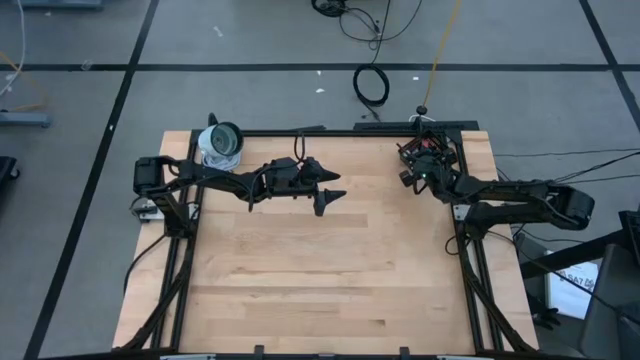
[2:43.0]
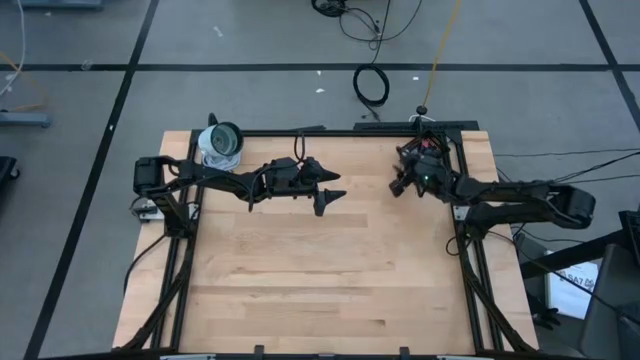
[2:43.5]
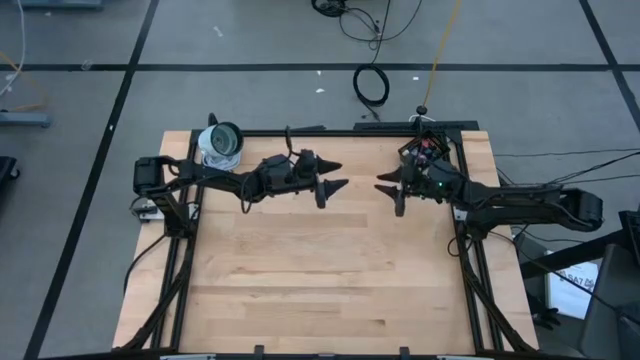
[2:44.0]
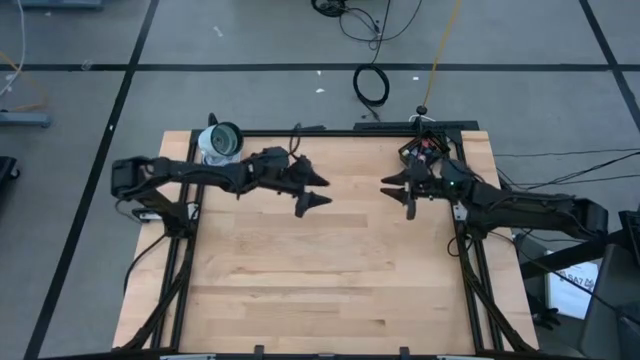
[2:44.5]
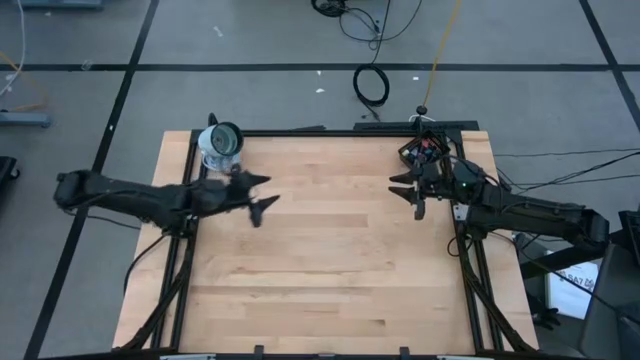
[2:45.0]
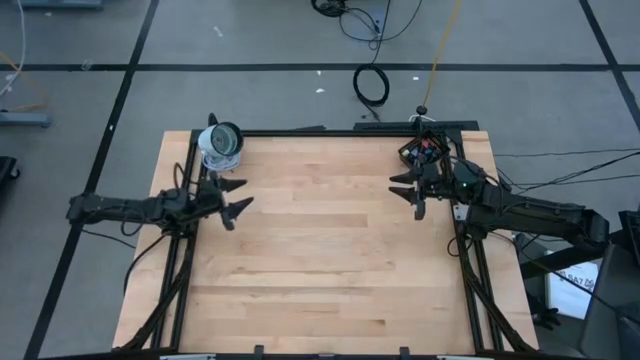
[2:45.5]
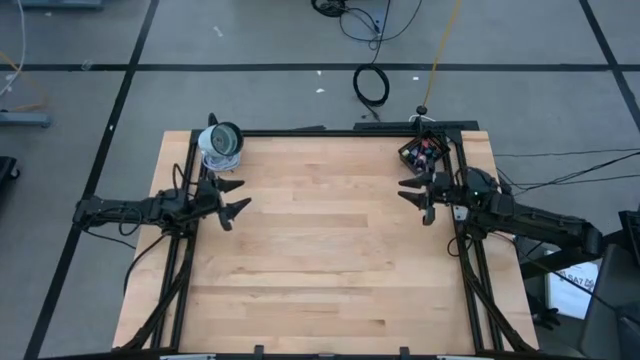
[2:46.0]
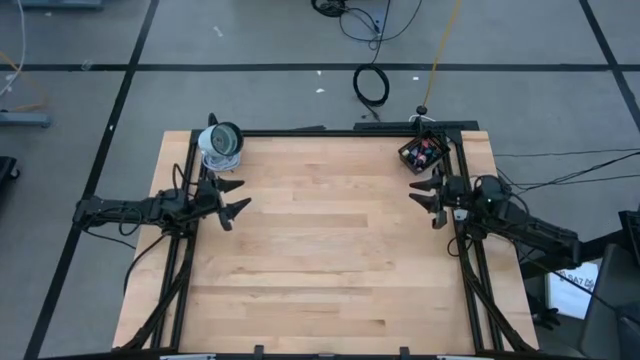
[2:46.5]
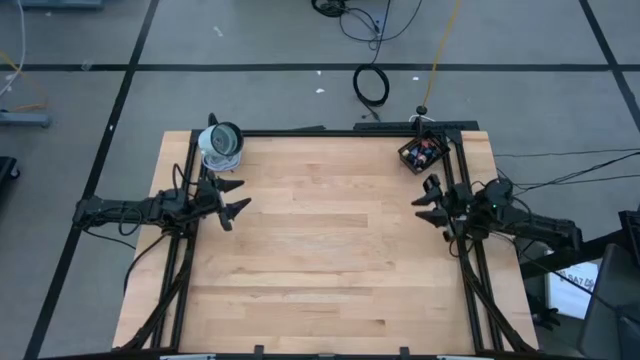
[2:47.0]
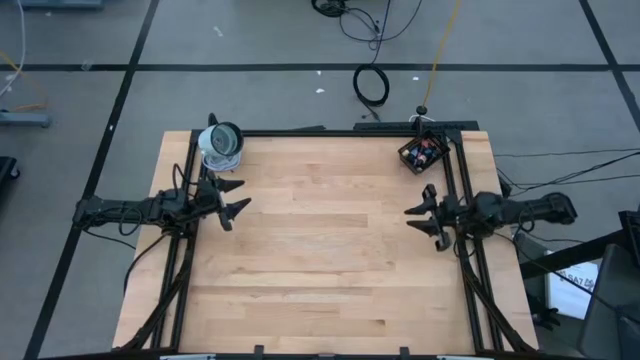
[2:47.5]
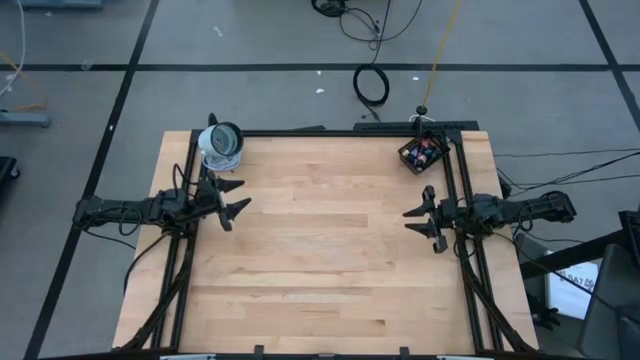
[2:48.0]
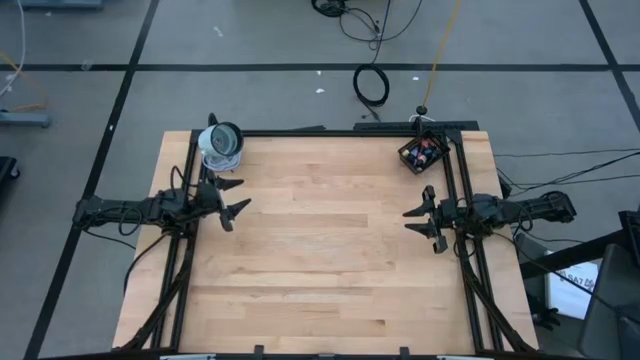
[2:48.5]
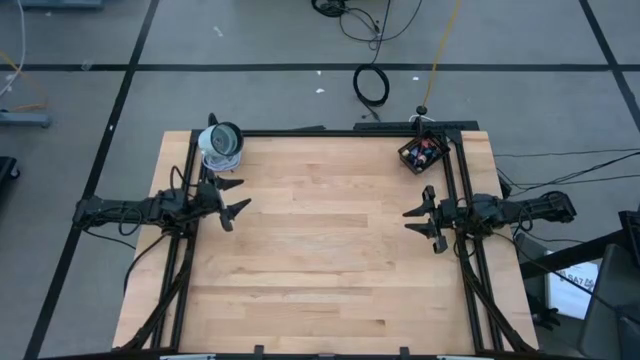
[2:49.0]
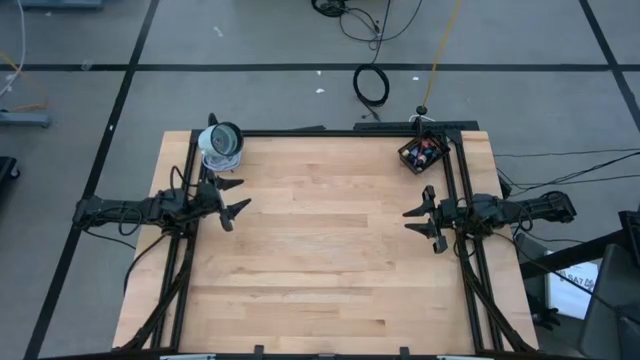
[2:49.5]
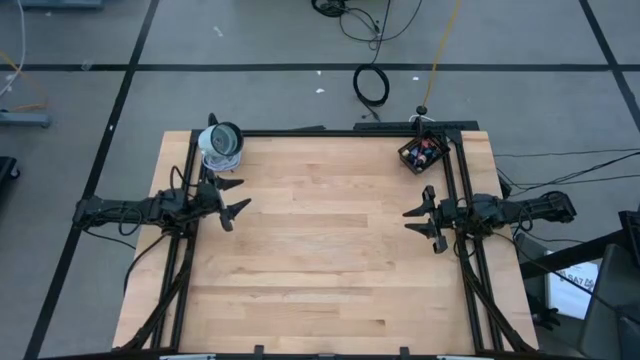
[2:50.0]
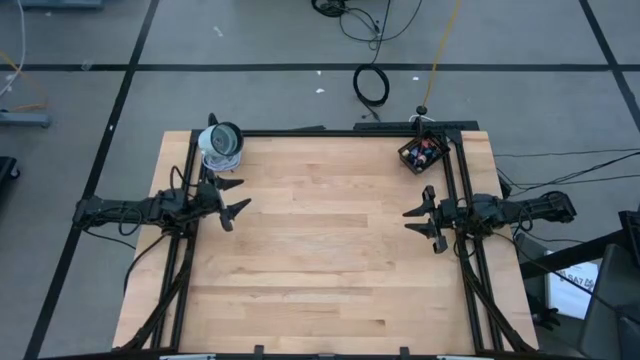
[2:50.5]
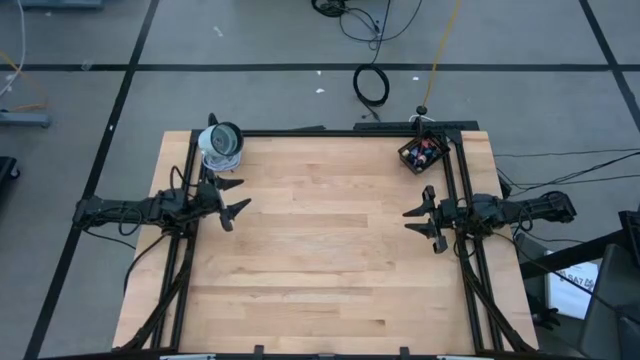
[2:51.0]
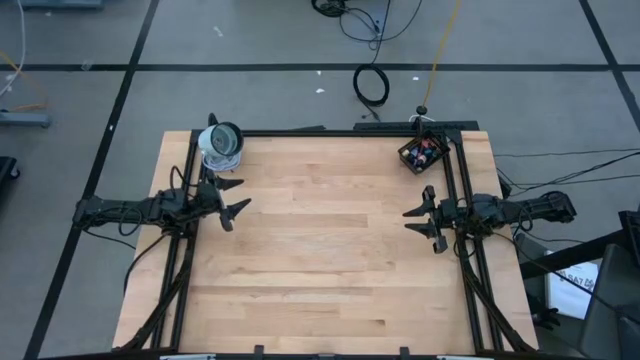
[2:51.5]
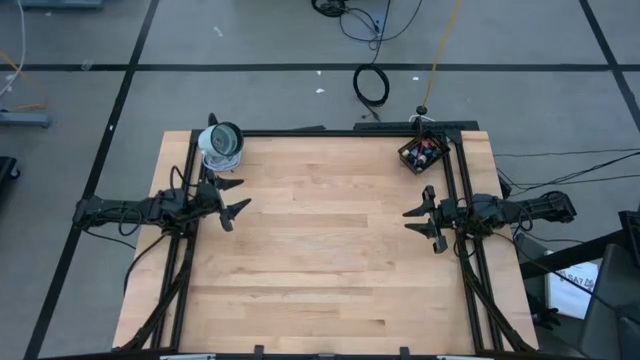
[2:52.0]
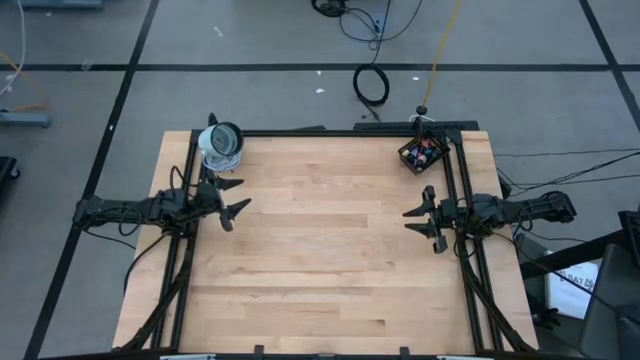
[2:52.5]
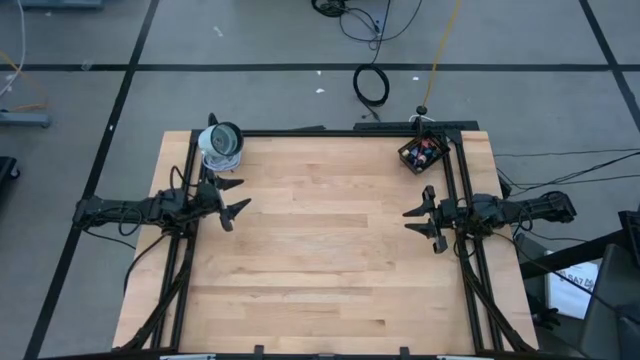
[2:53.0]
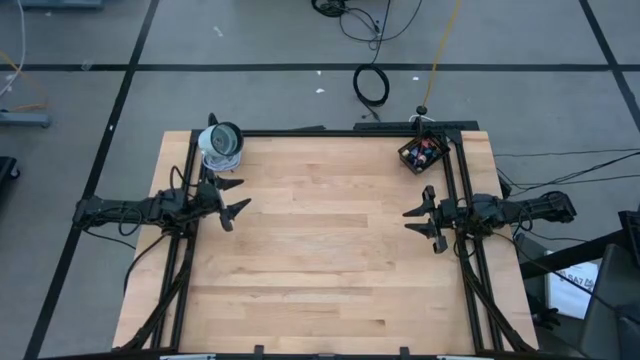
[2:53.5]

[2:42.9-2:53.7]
Task: Pick & Place Nail Polish
Return to Home Position

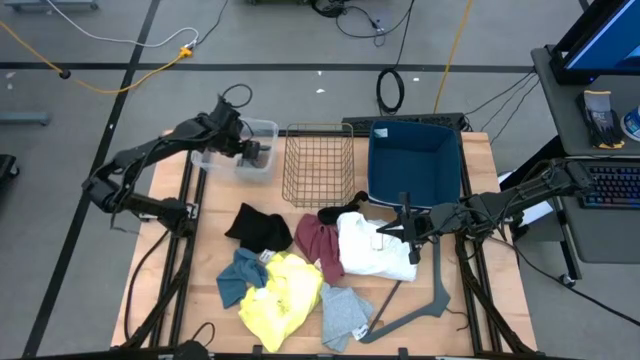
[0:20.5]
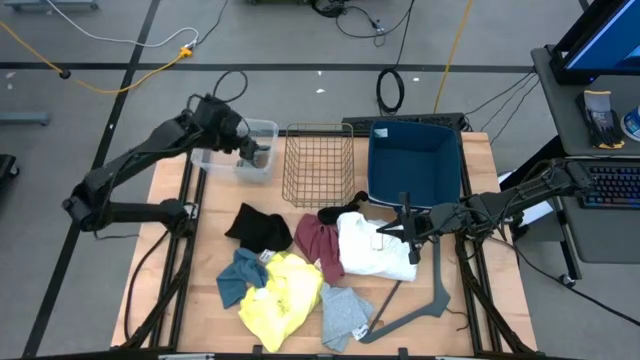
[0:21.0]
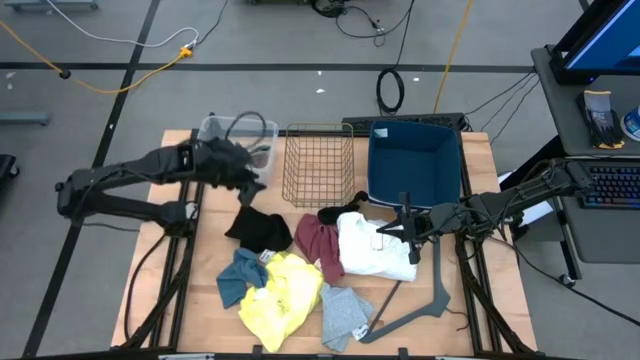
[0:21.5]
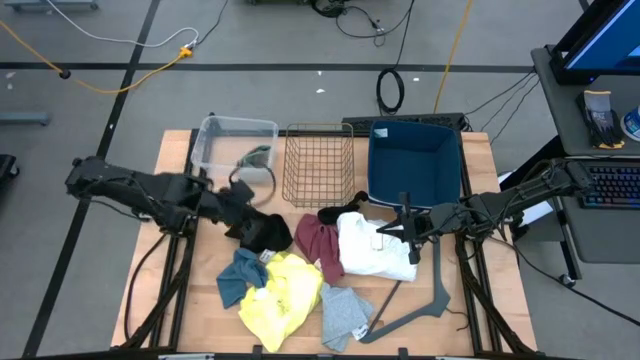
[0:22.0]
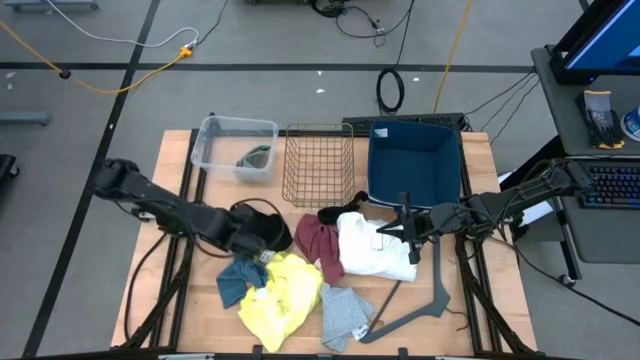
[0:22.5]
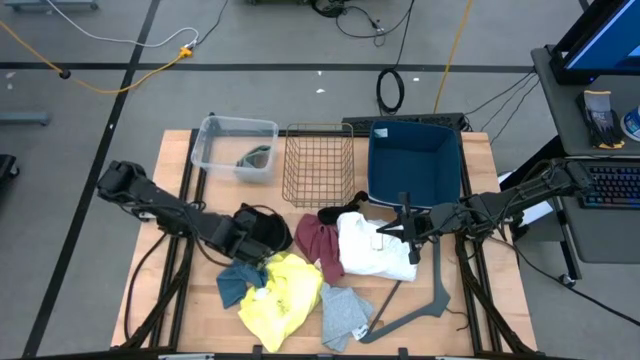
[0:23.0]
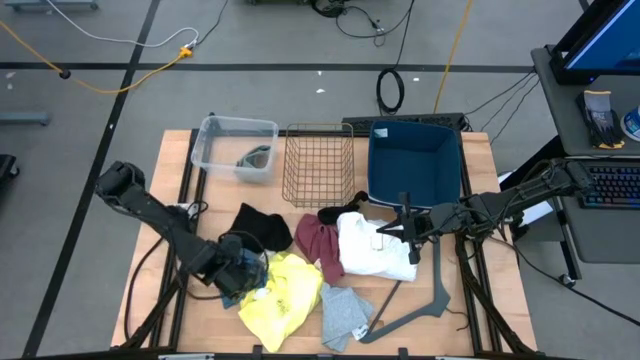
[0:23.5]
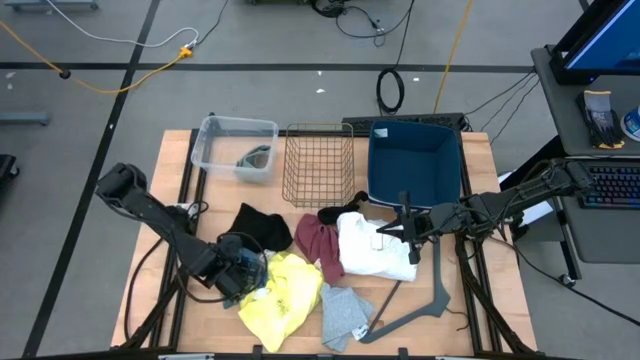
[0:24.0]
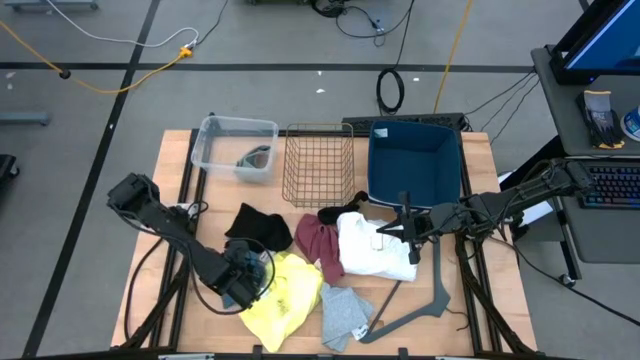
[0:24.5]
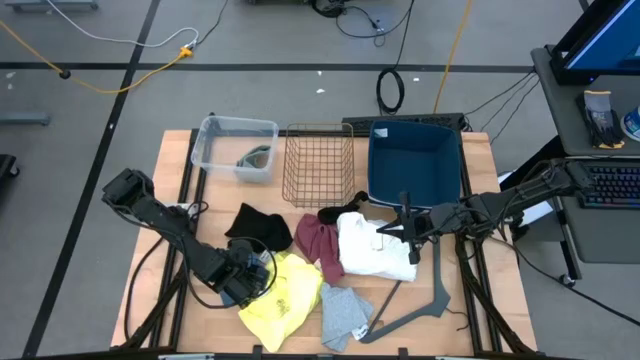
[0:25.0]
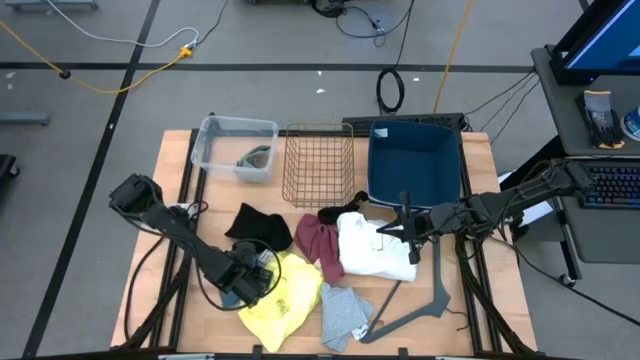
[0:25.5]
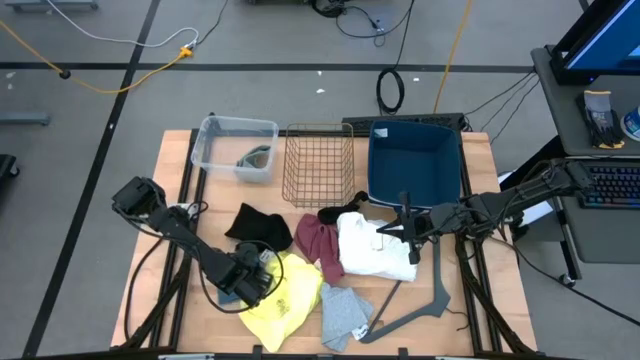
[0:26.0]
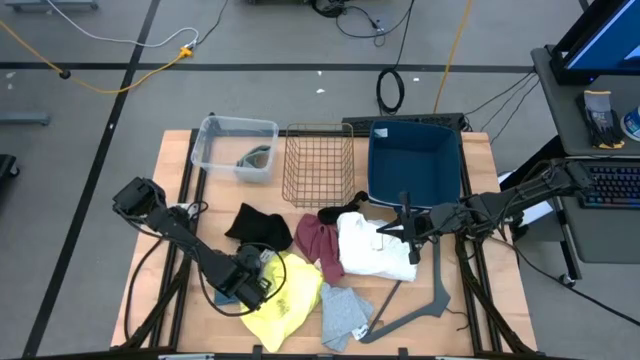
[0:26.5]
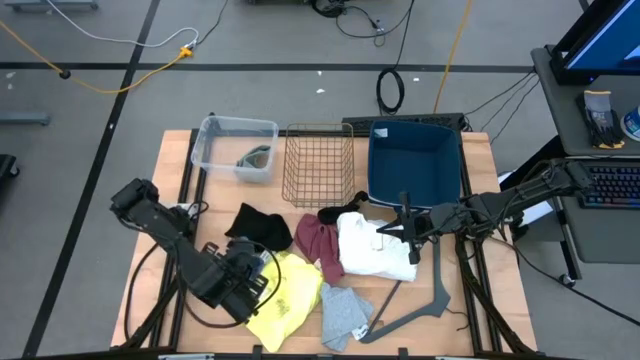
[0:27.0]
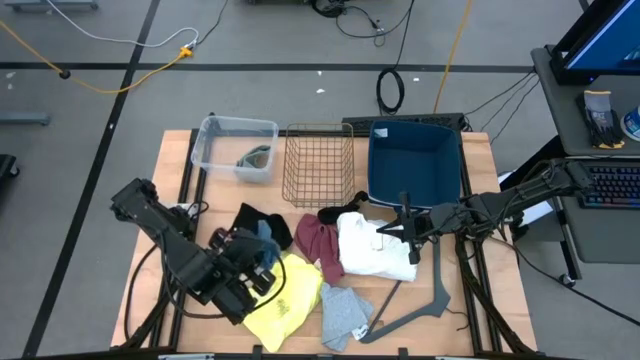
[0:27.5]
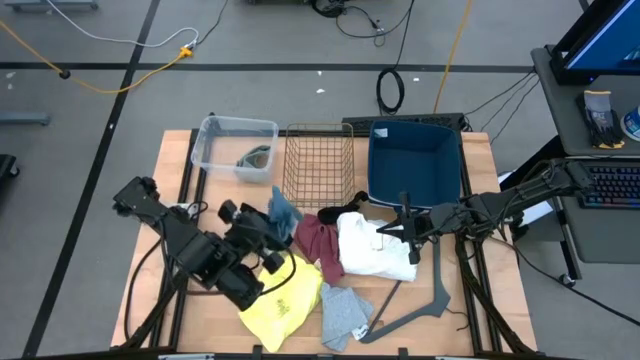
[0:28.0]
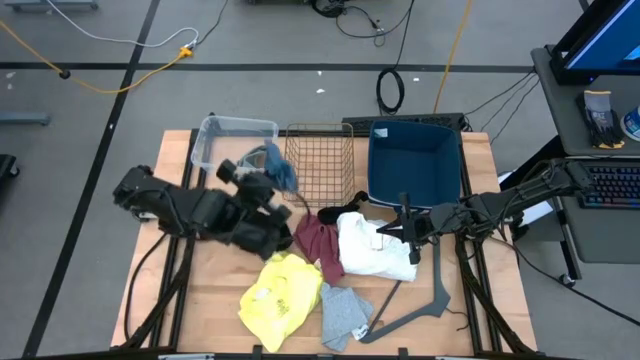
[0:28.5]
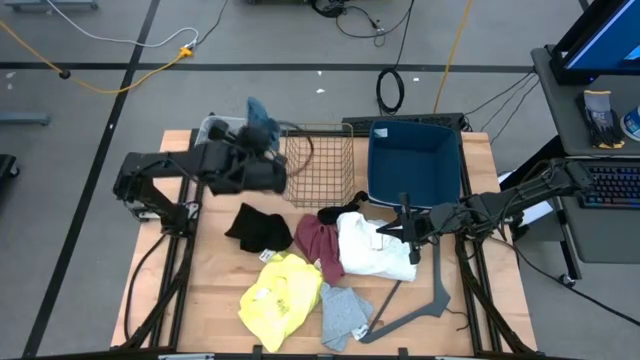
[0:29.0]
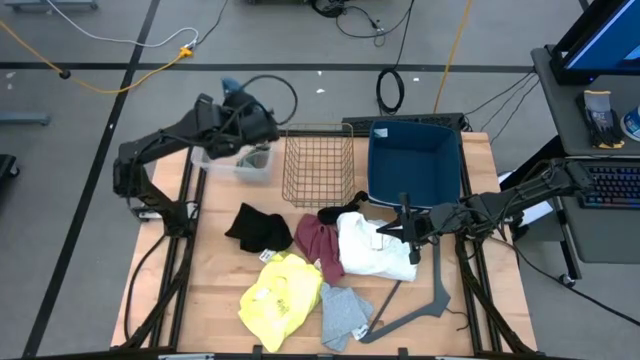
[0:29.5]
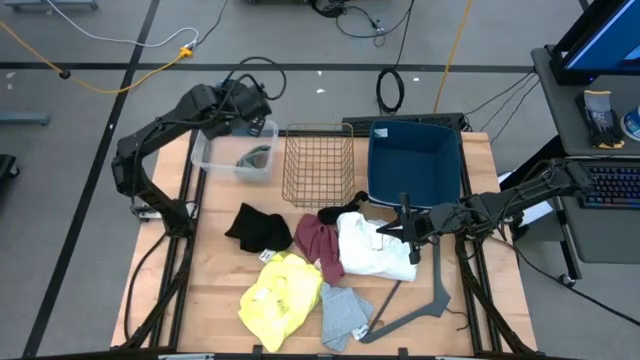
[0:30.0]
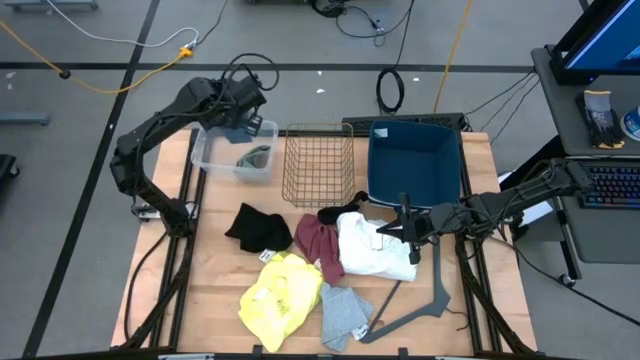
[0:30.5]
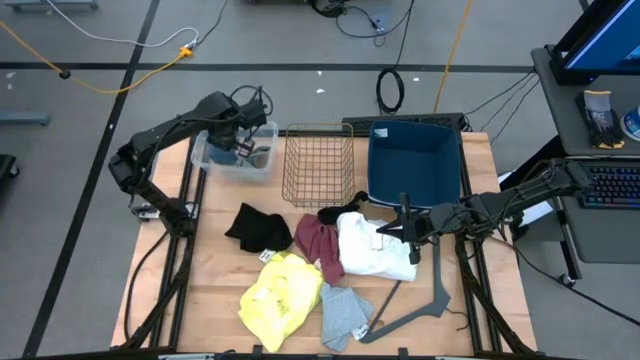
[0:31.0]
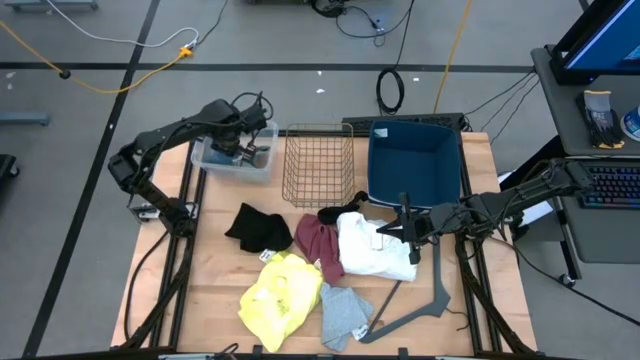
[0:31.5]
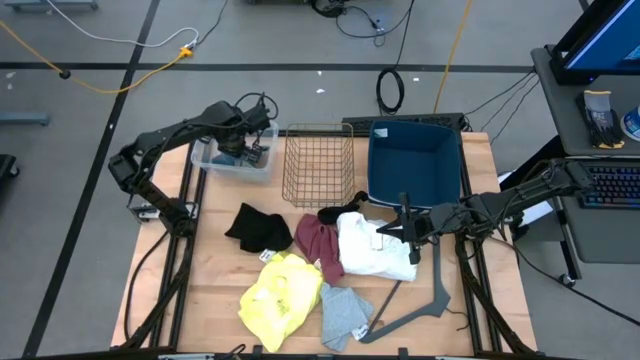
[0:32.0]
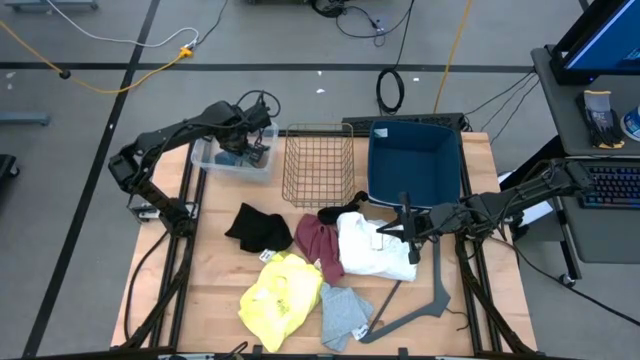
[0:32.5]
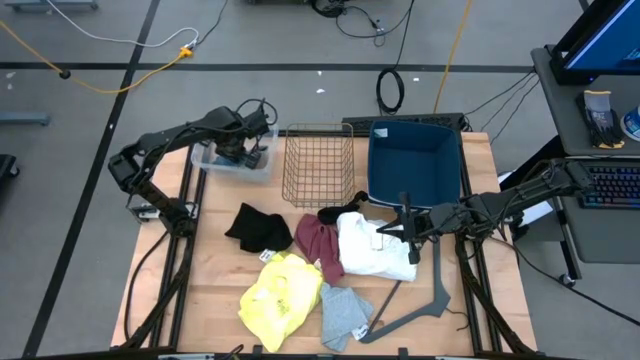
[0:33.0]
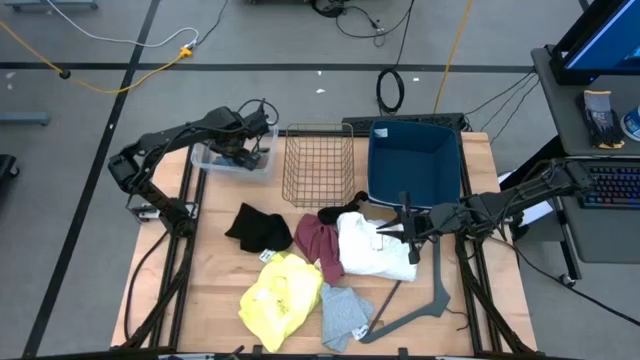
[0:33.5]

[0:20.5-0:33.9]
Task: Pick & Place Cloths
Put the blue sock into the transparent bin
